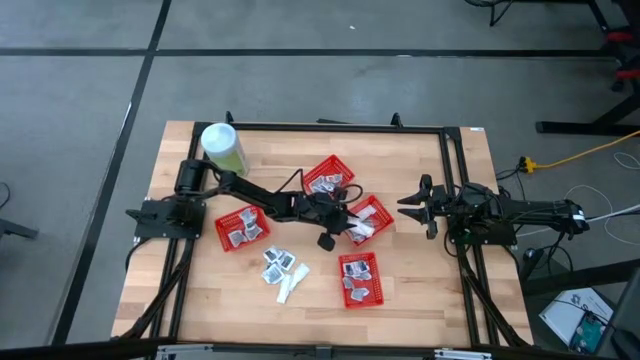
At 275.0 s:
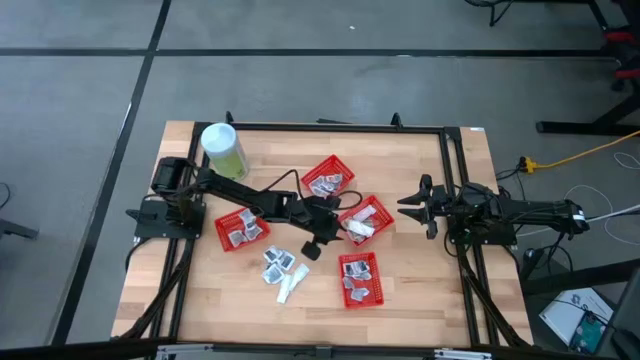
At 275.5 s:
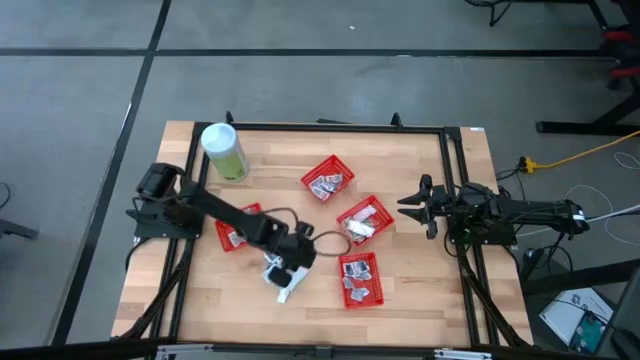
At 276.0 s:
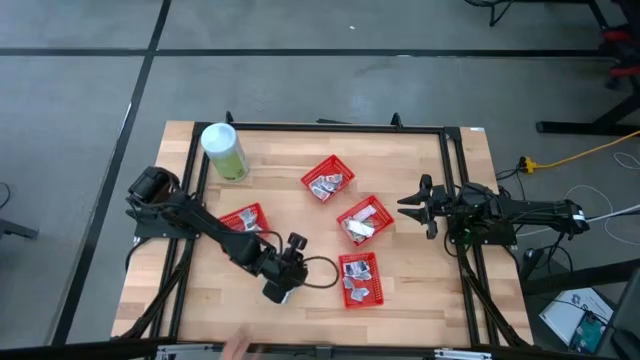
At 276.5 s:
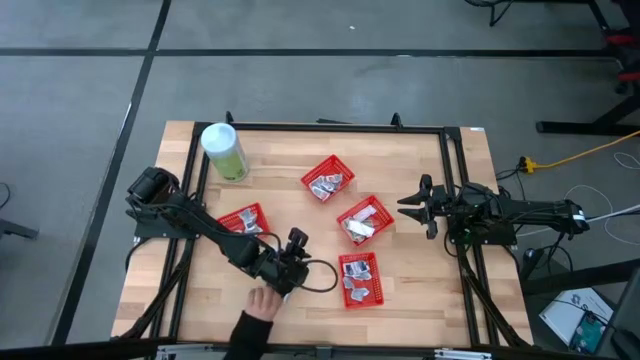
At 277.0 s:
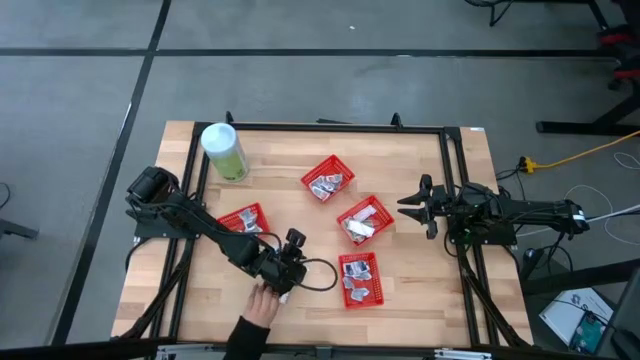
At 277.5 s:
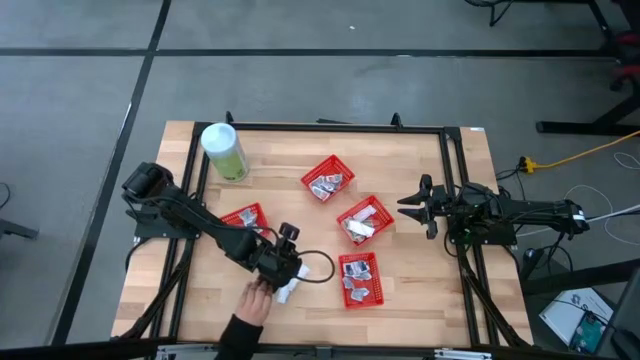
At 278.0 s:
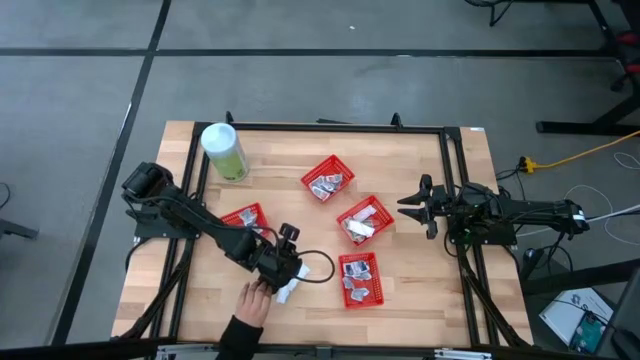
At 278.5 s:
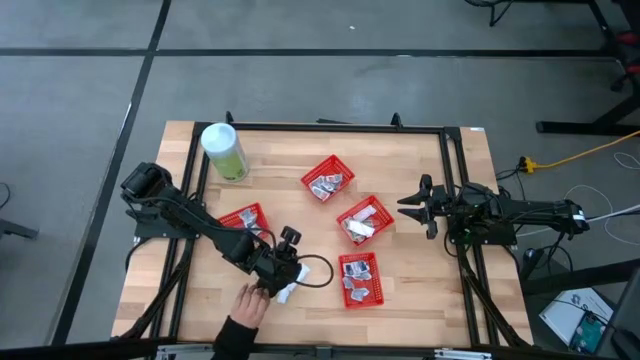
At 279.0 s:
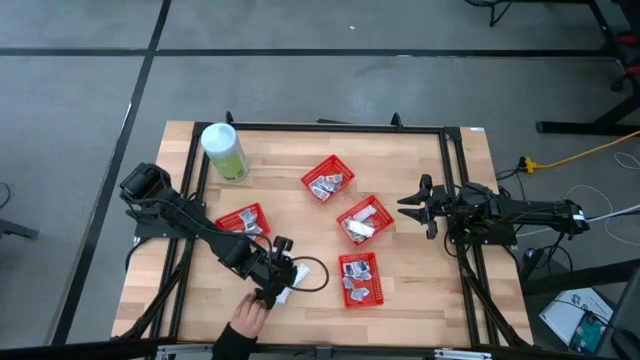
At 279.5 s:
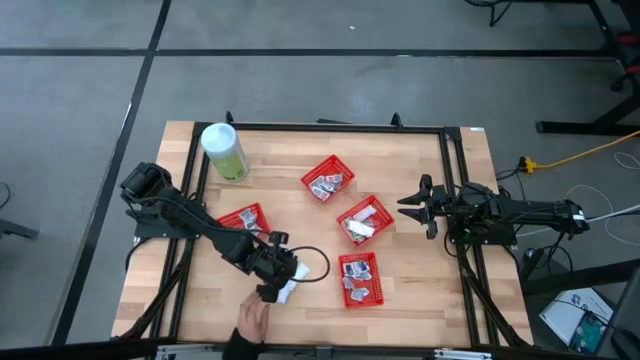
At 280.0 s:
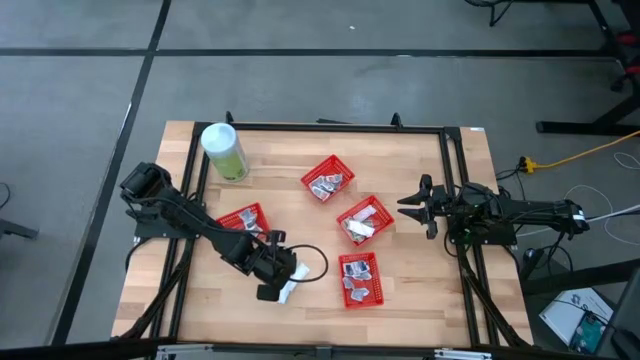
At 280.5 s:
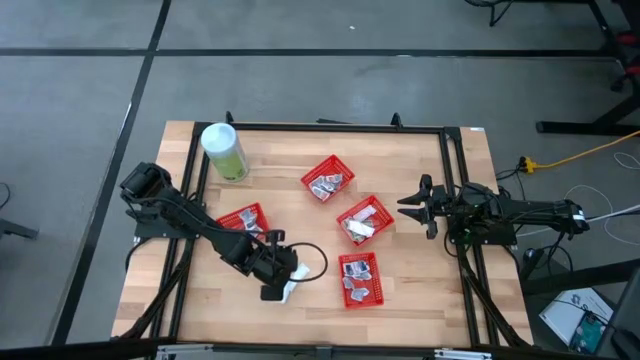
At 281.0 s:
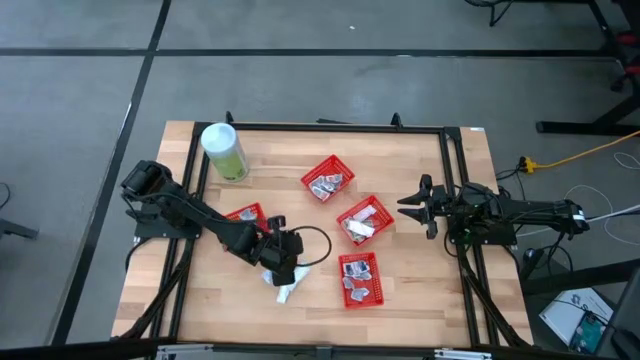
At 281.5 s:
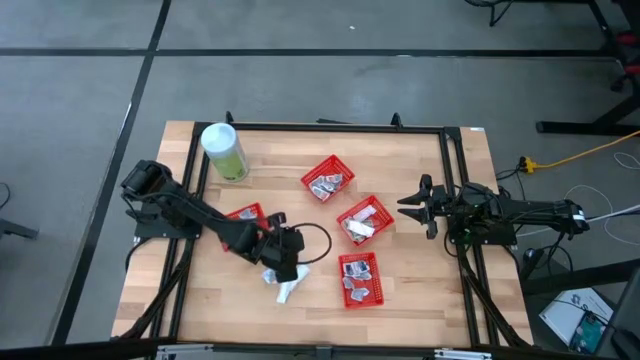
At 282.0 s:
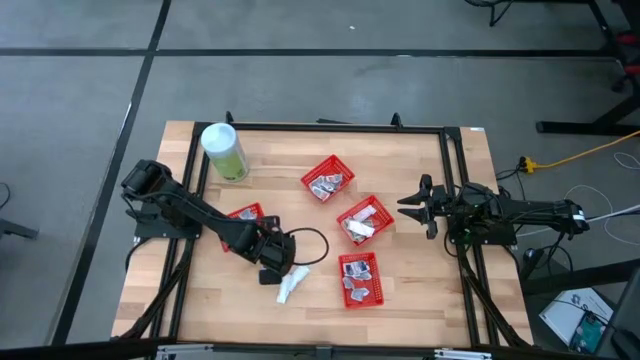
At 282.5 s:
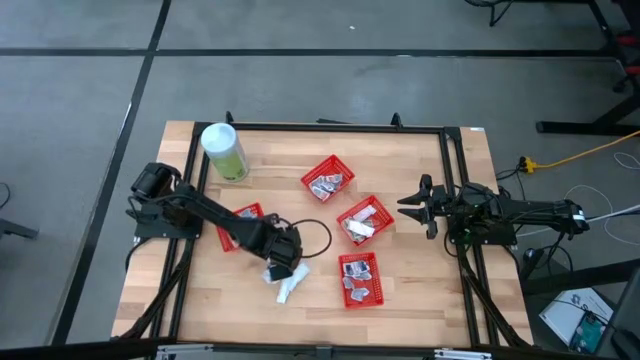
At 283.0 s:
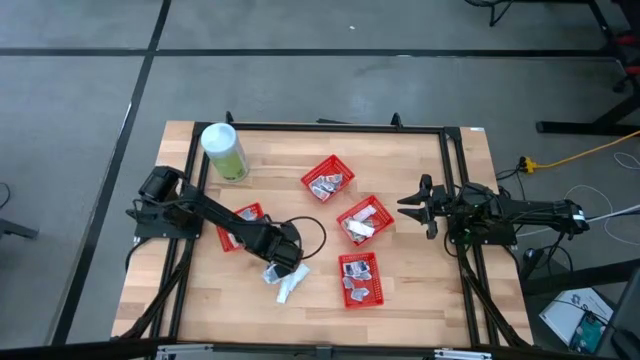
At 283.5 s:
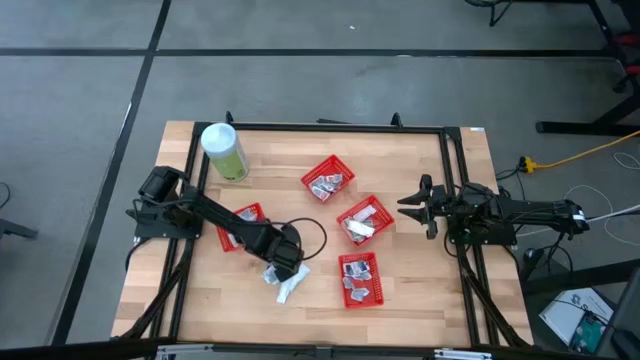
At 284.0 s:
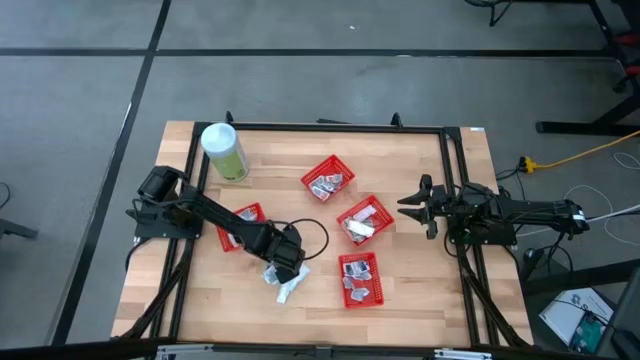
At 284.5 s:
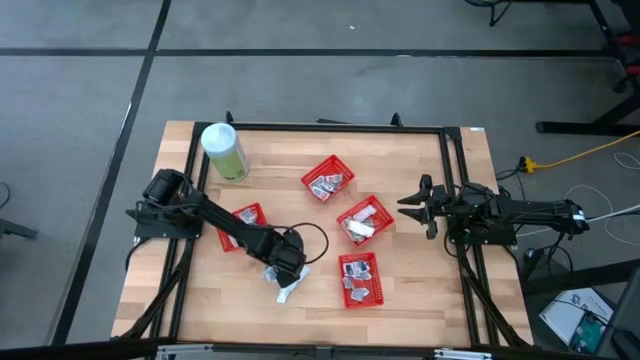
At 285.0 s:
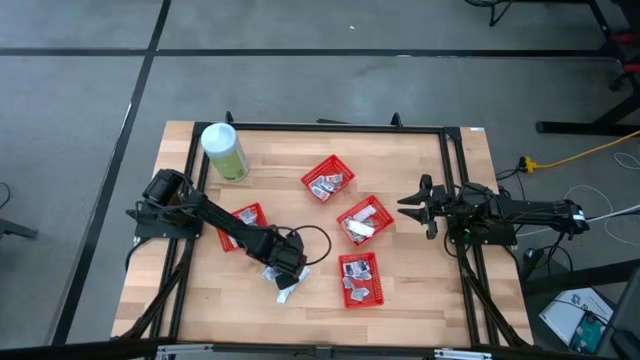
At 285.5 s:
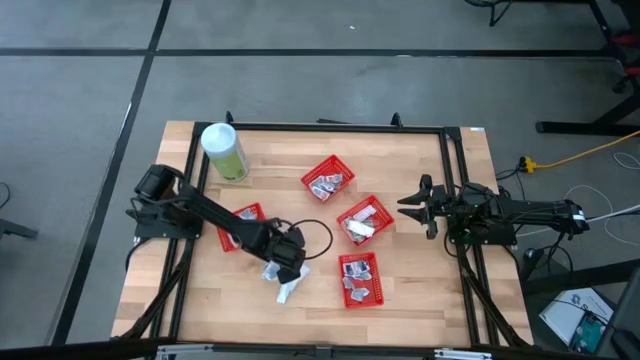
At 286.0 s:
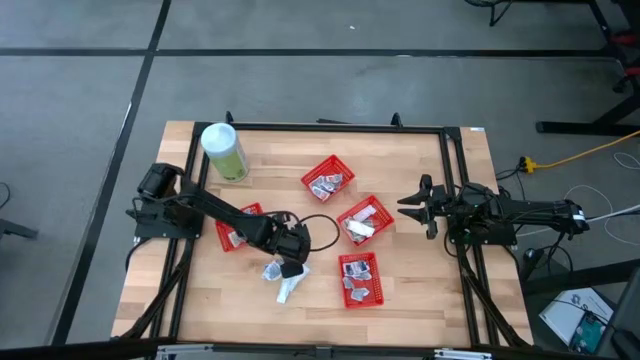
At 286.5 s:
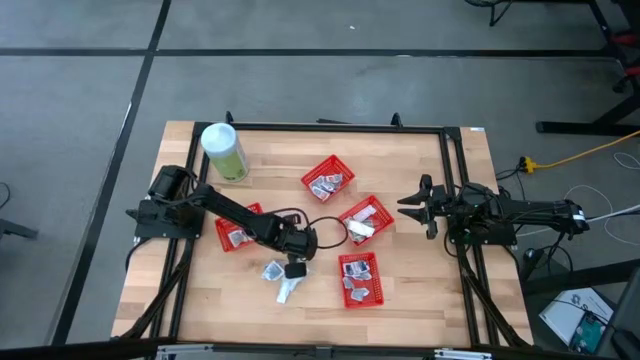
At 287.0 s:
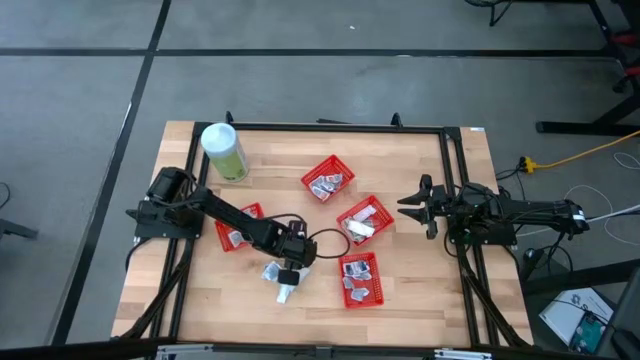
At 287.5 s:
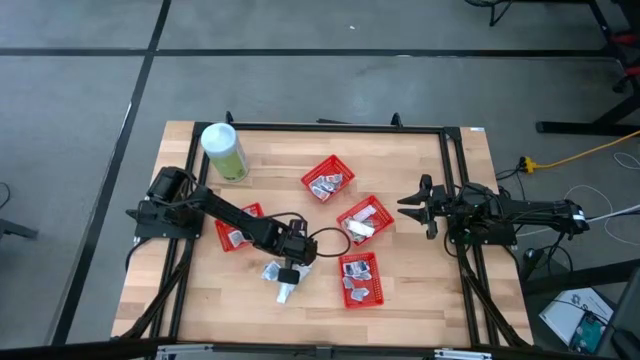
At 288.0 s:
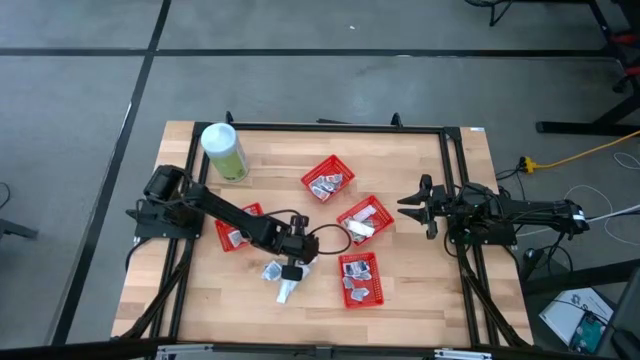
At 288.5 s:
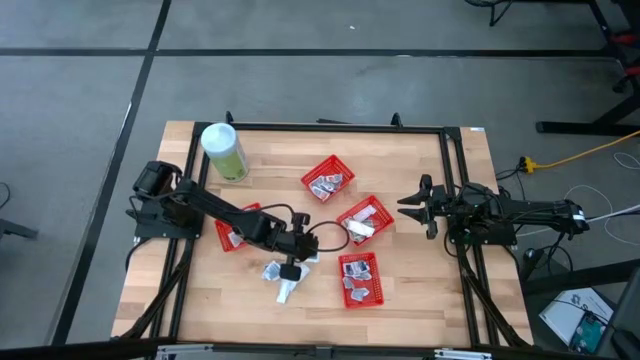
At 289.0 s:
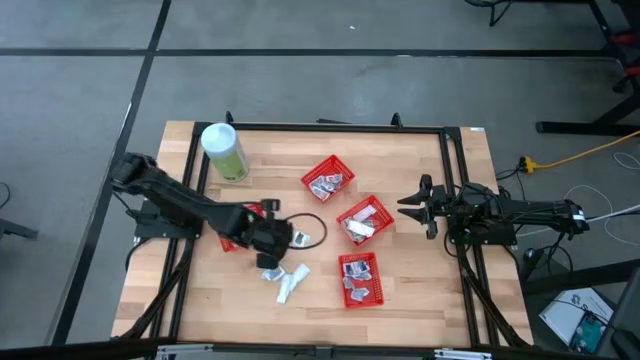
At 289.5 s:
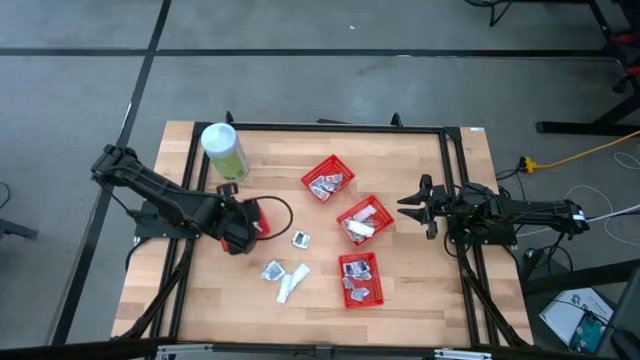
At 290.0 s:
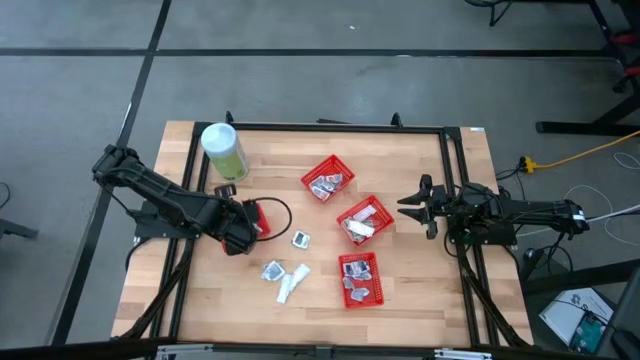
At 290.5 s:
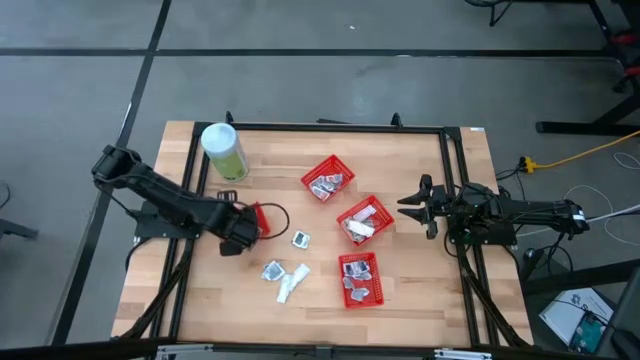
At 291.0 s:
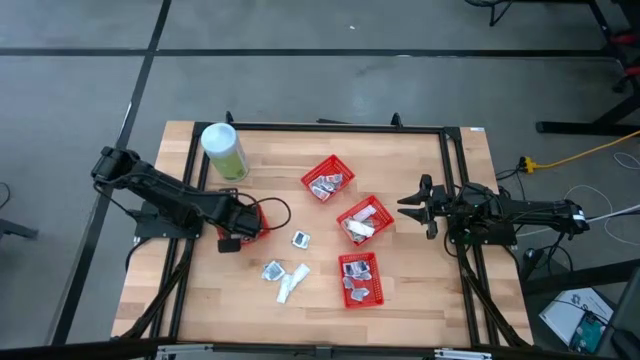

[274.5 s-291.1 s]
Task: Pick & Place First Aid Supplies
Put the gray towelette pack into the red container

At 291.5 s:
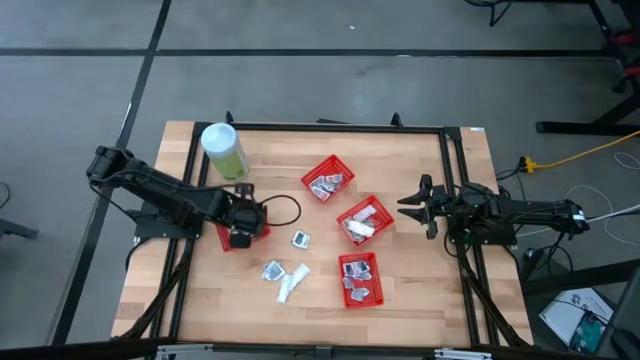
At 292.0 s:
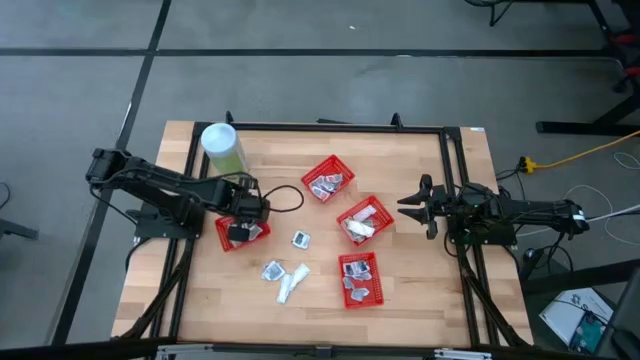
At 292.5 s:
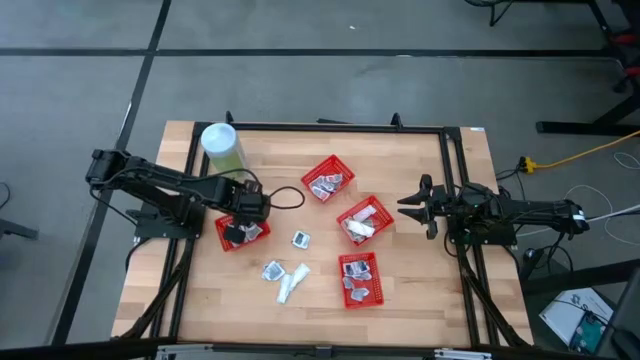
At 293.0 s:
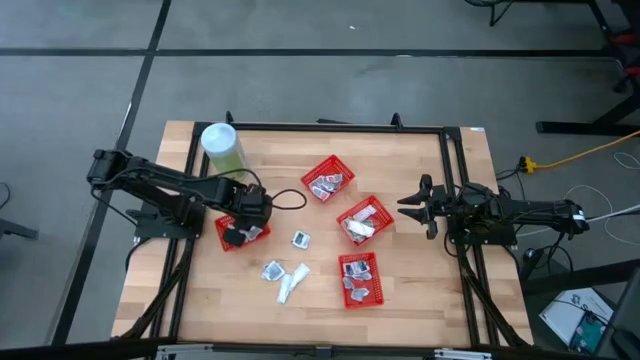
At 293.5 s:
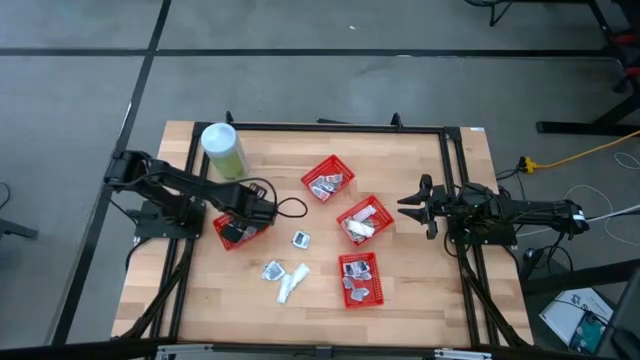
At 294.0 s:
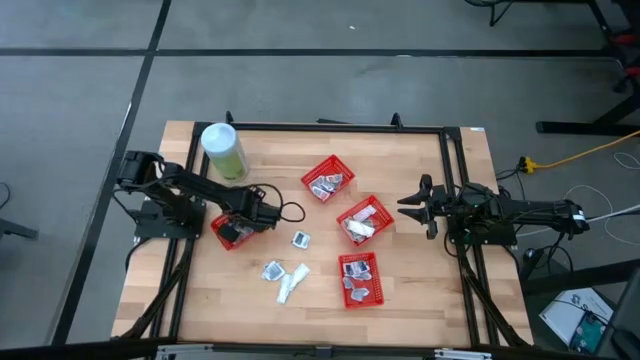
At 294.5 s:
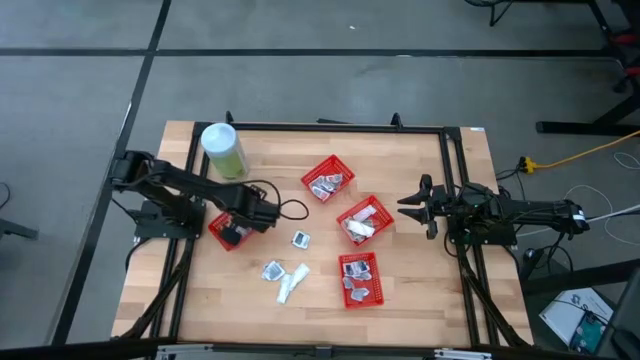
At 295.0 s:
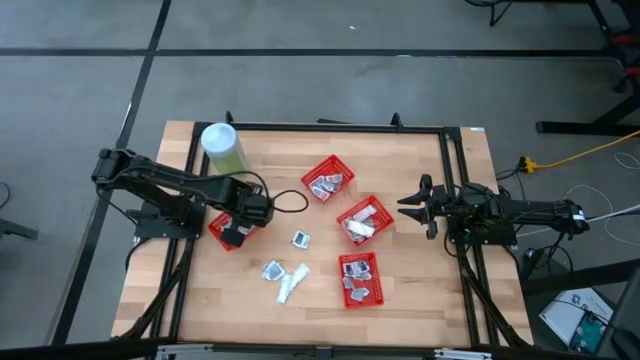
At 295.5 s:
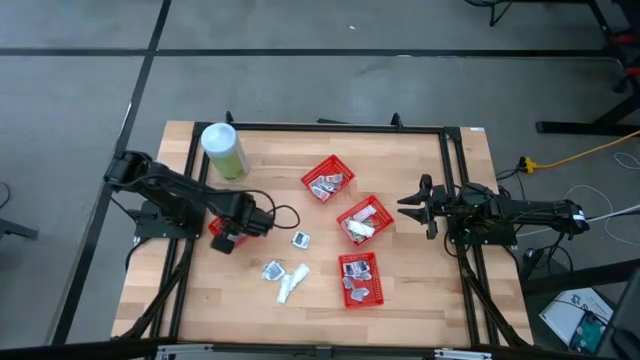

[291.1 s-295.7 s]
Remove the blue alcohol pad from the red container

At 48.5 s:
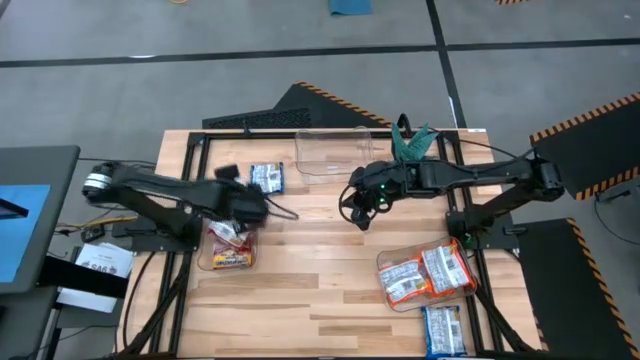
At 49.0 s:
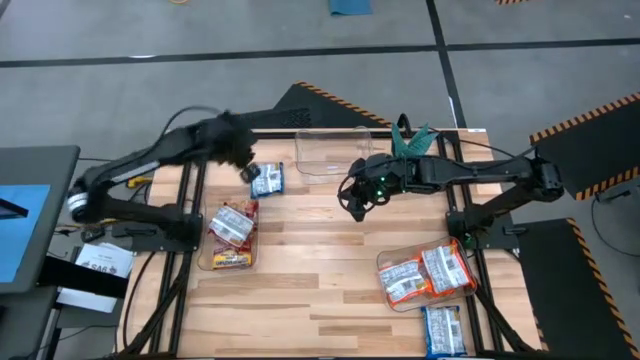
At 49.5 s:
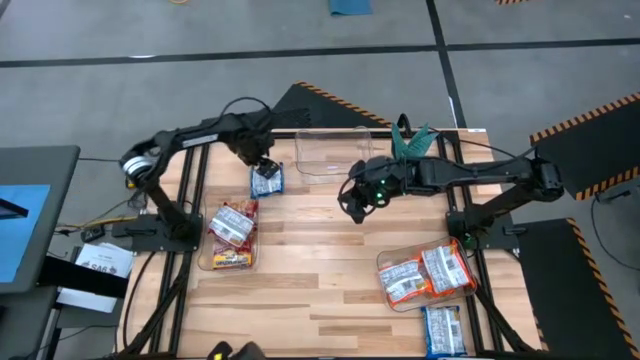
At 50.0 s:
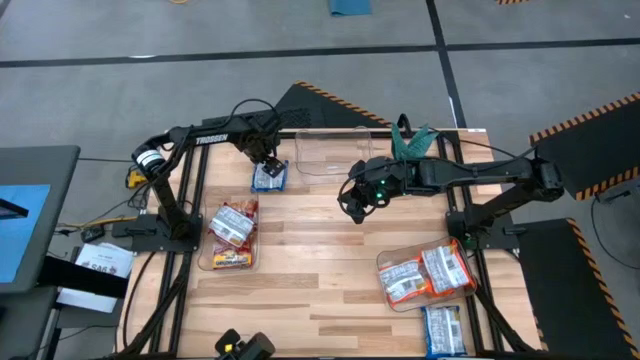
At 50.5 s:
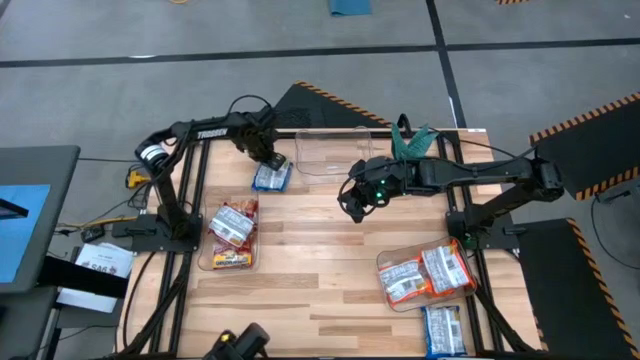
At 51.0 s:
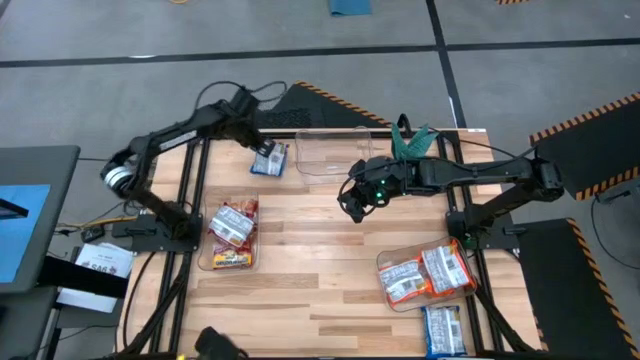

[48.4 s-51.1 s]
Task: Sort Maruchan noodles
Put the top blue noodle pack into the top transparent bin
